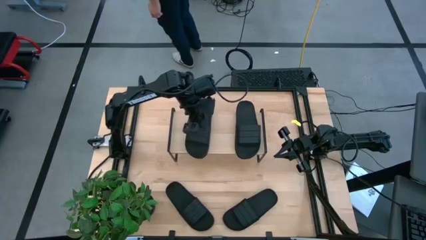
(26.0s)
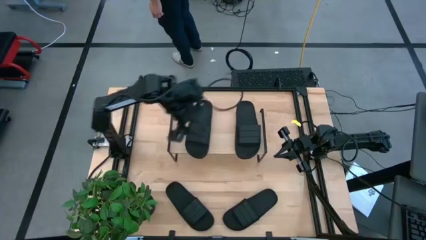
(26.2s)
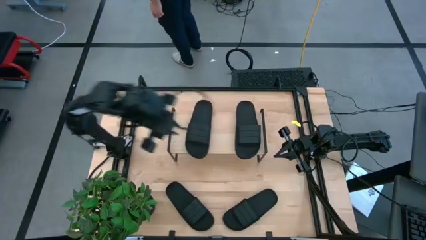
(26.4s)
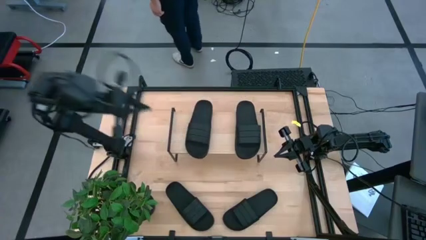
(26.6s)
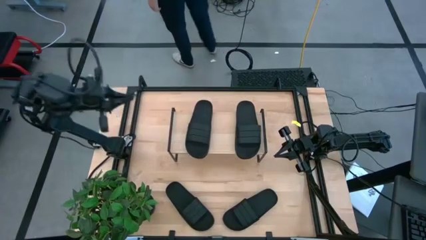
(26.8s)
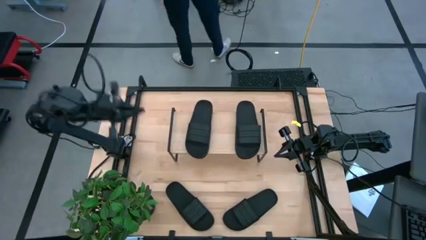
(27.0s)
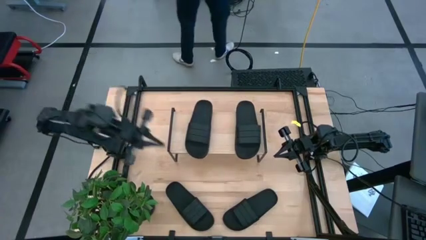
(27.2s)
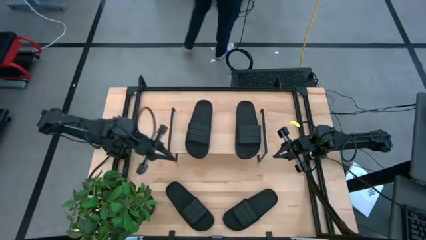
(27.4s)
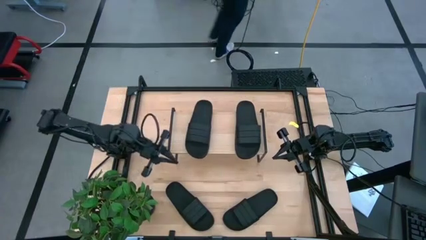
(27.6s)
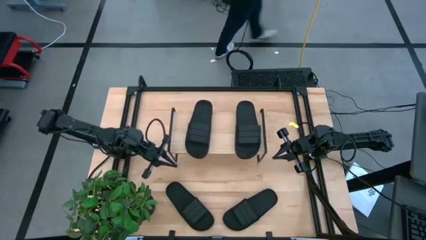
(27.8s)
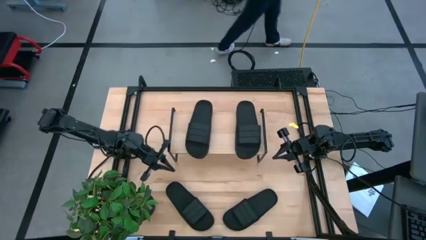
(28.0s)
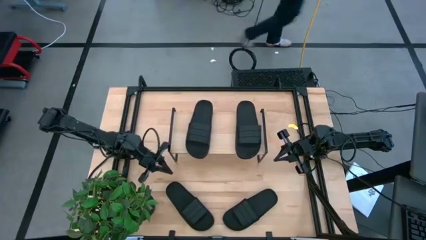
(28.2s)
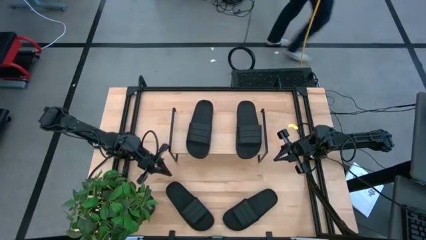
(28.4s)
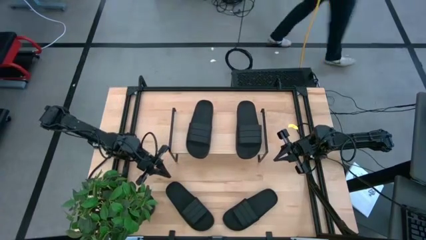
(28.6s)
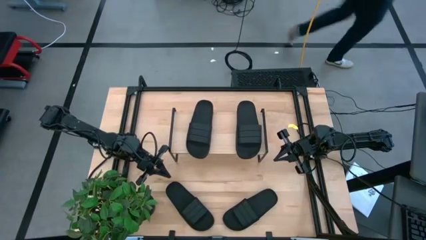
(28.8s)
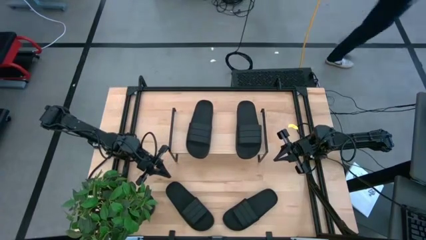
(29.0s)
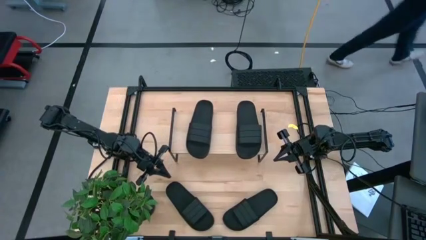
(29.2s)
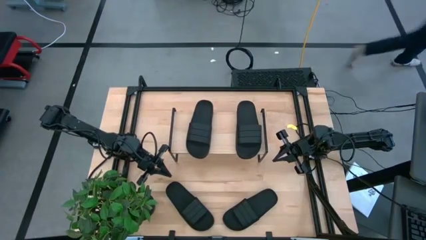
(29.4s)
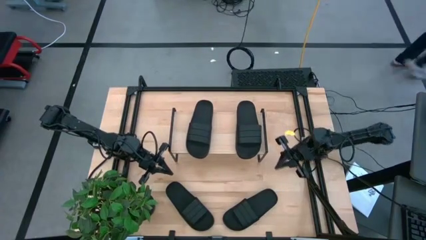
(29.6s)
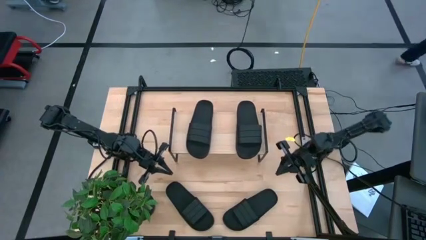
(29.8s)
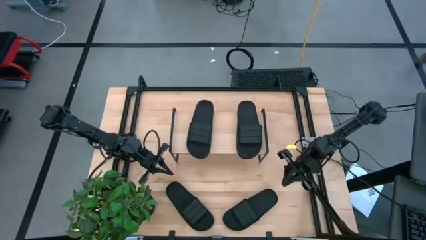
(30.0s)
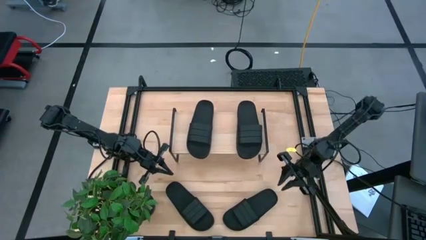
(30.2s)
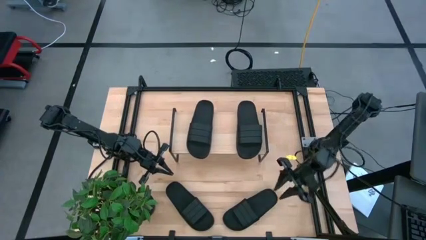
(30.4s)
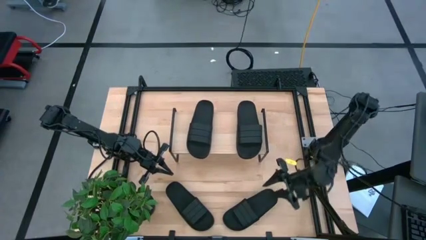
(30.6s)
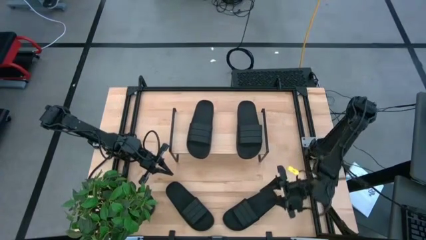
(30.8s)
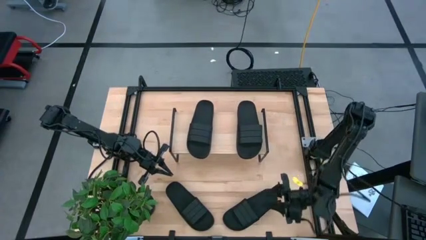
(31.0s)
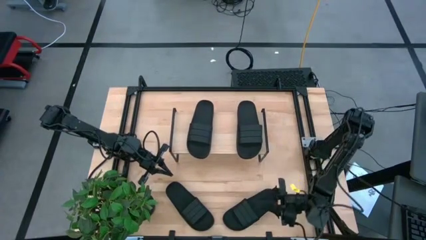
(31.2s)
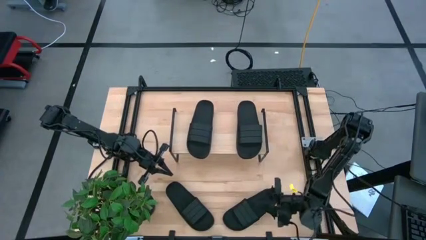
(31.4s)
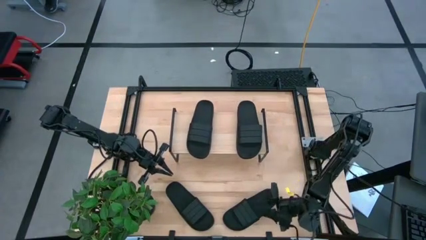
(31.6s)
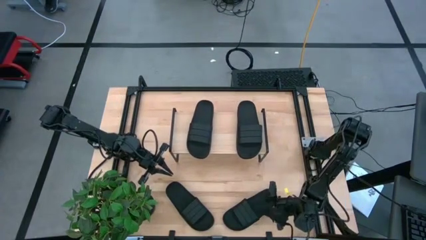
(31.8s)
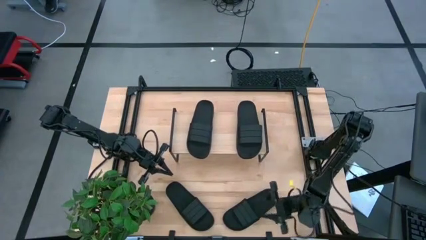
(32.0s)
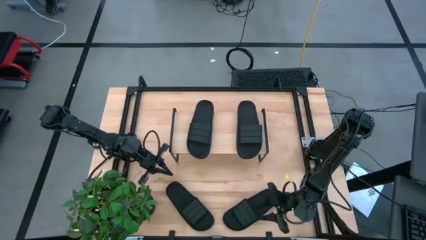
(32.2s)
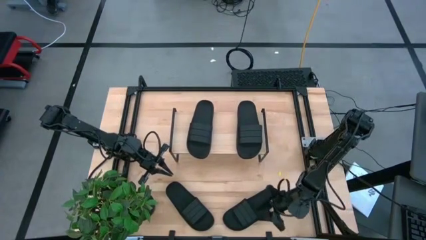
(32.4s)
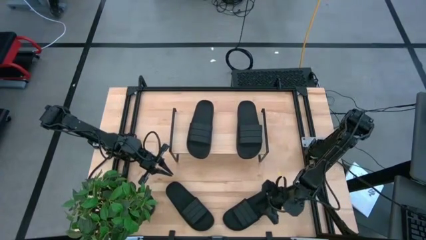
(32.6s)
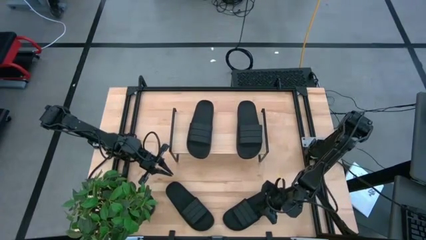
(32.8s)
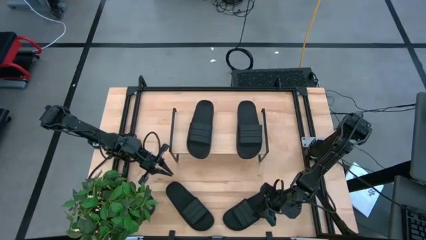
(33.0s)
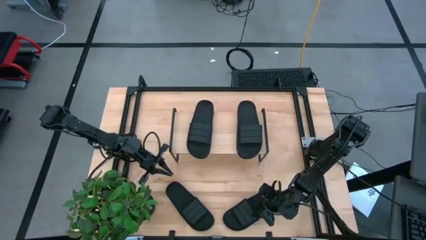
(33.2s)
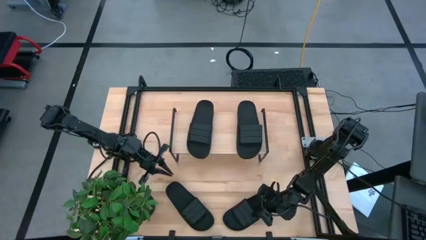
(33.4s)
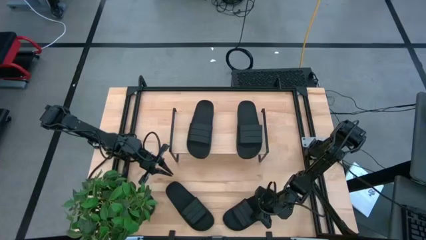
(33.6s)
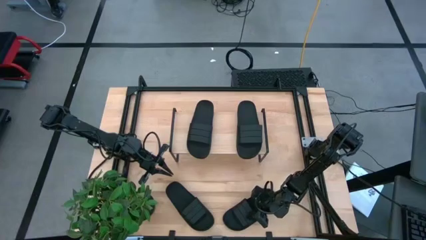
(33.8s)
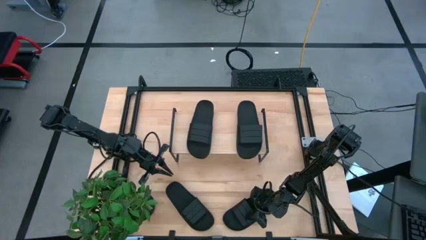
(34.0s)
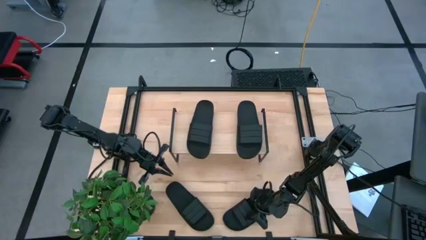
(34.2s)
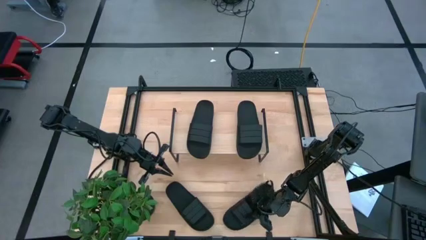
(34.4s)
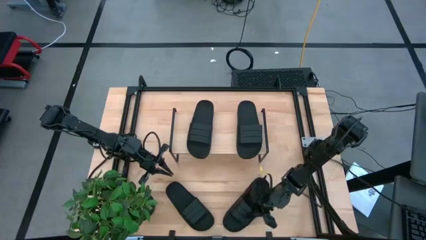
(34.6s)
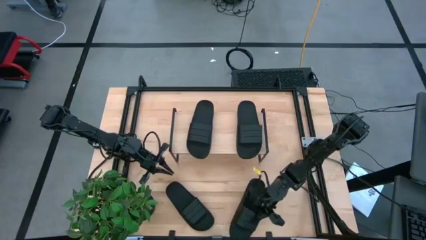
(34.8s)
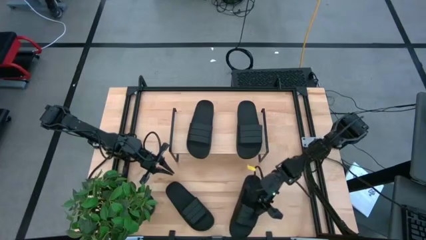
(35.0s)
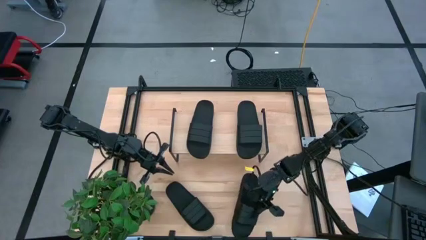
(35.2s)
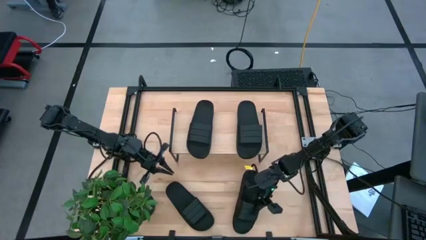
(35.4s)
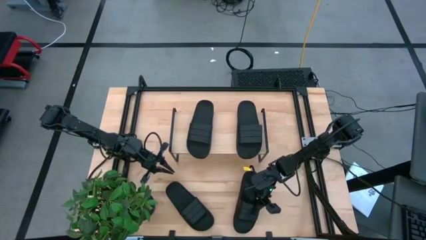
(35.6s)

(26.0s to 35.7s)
Task: Pick and place slides into the shelf
Put the right slide under the shelf

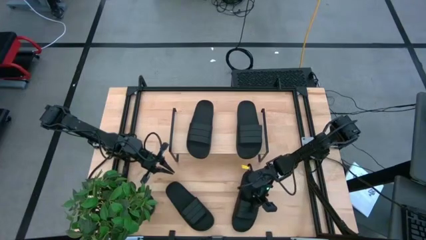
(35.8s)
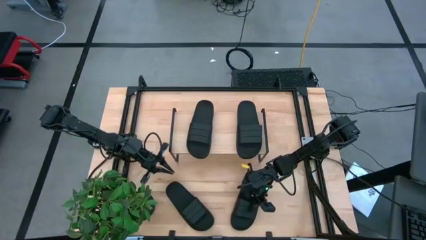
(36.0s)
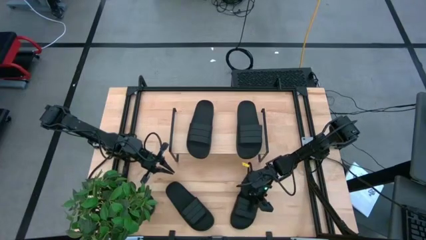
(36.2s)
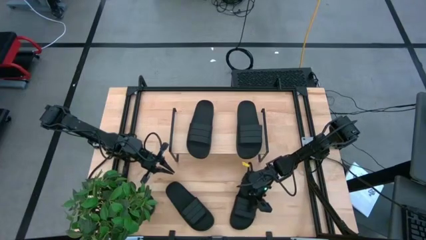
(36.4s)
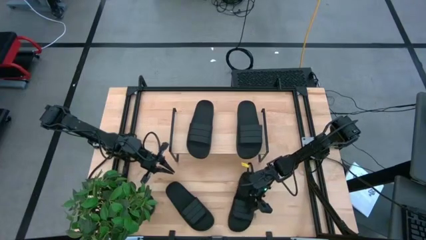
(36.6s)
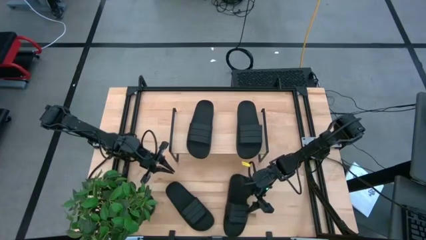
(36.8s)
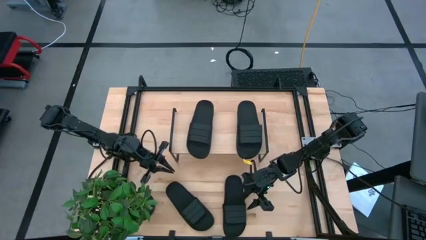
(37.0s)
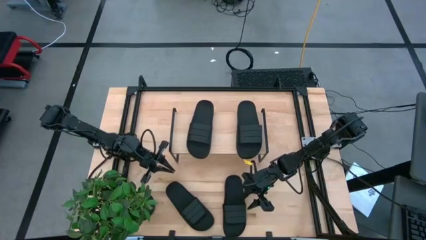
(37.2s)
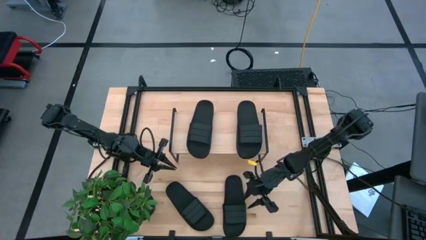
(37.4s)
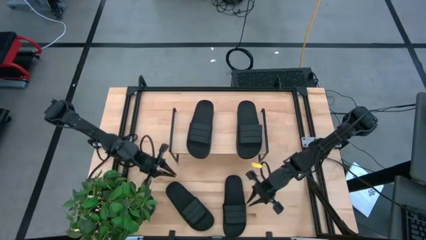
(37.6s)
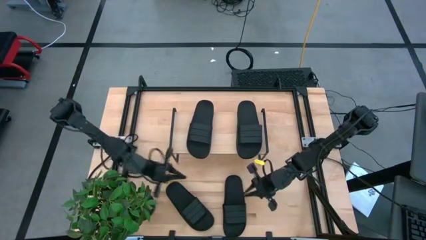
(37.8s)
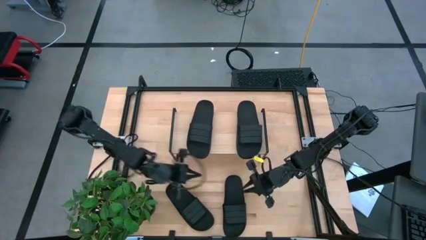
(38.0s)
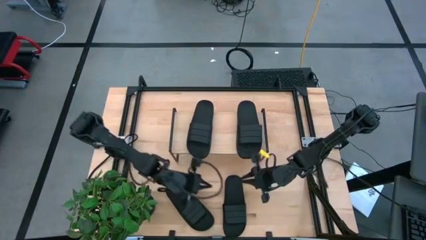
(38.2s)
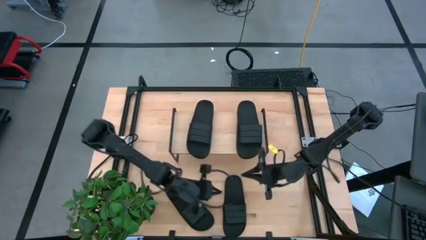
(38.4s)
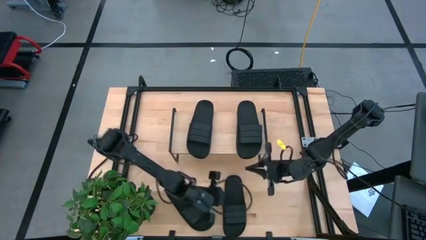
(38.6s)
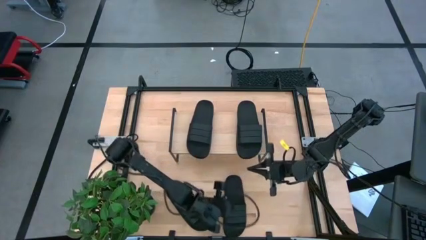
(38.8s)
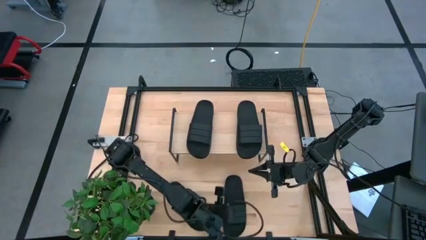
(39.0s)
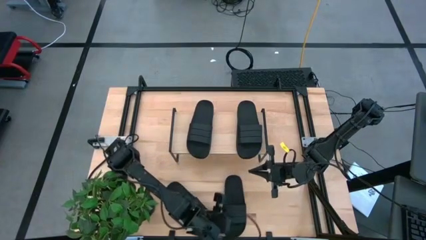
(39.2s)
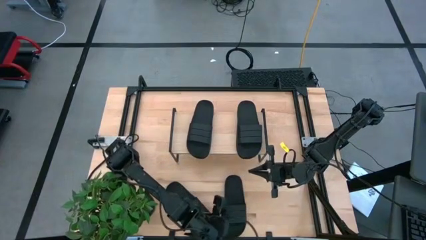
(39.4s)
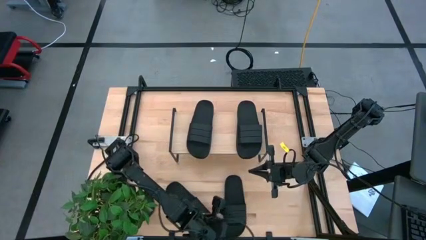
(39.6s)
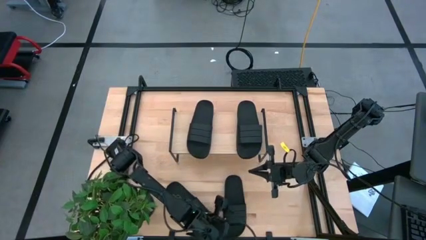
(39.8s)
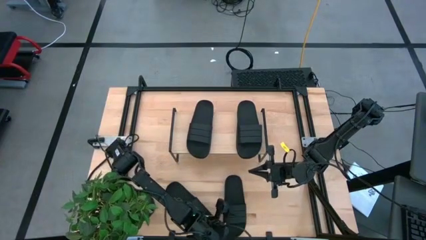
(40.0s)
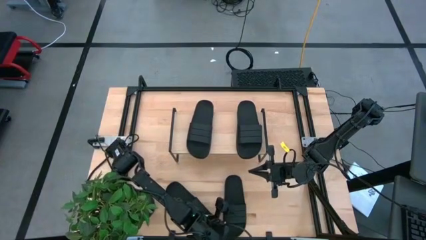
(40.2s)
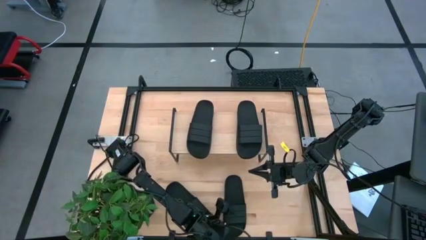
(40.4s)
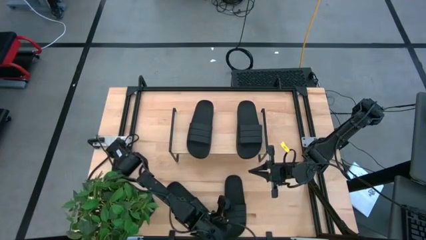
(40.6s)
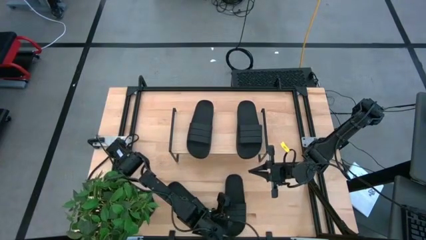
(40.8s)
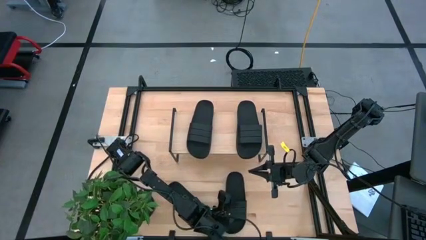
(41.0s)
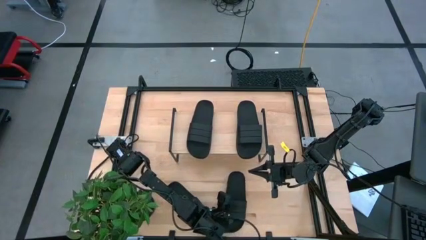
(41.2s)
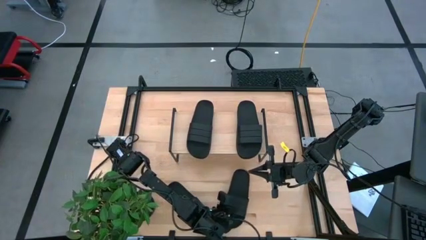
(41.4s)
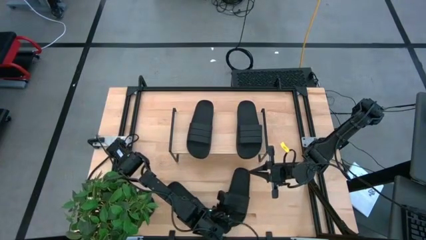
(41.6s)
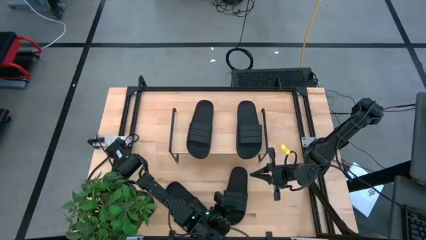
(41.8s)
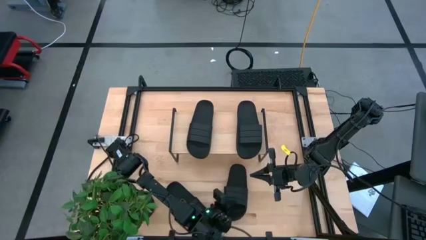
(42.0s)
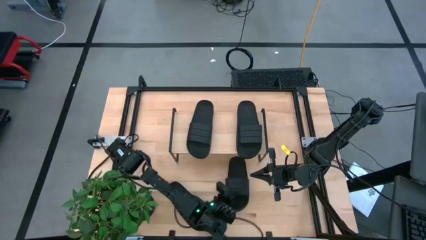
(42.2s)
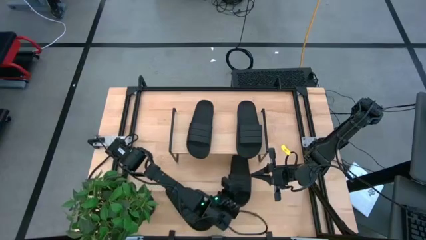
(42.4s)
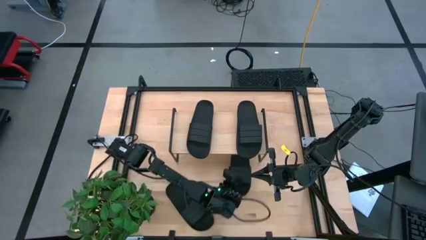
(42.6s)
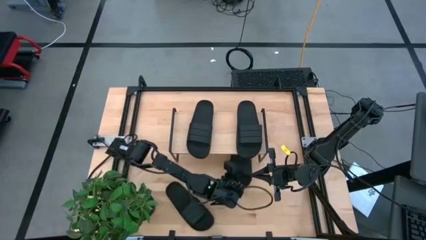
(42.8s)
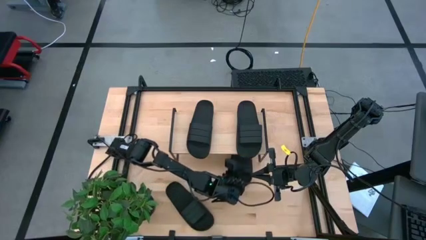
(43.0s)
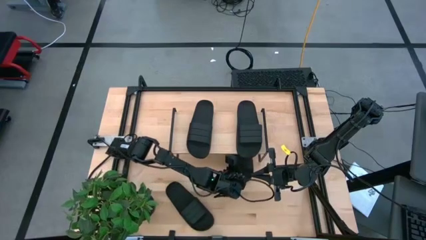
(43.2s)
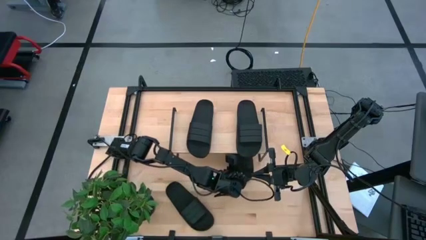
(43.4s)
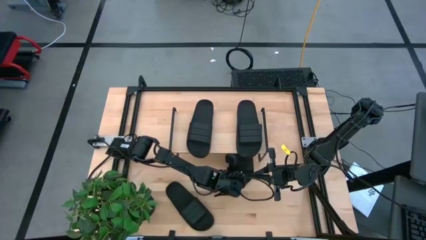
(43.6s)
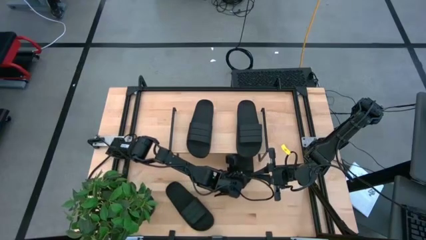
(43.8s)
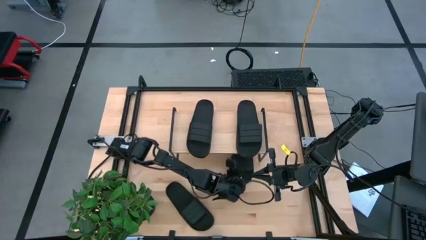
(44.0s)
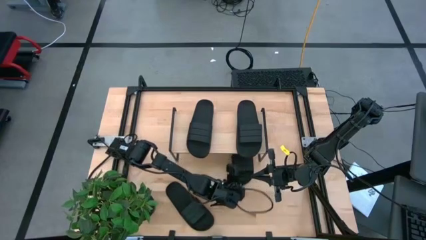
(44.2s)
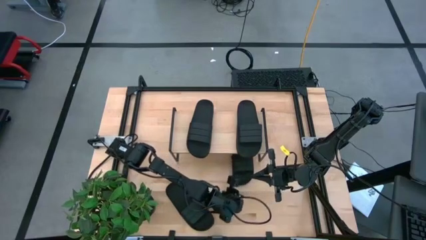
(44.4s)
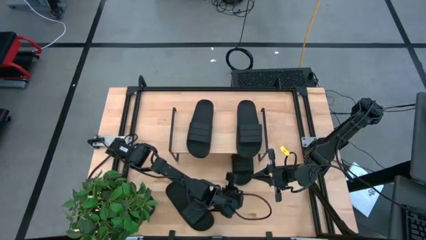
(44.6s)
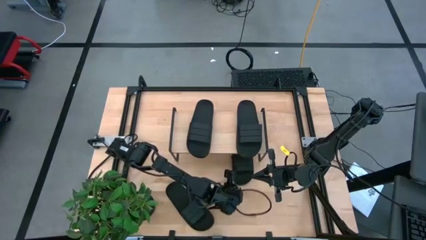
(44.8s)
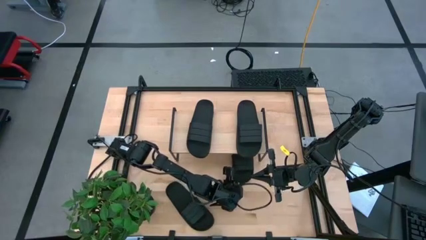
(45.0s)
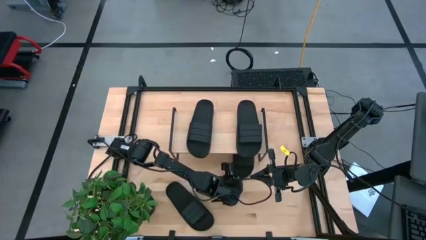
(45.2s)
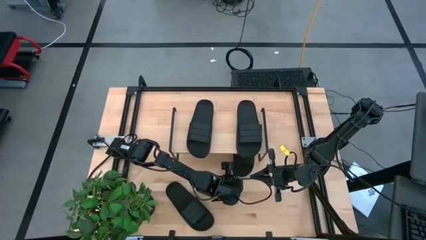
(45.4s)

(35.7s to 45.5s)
Put the right slide under the shelf
